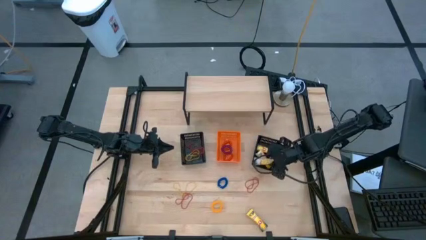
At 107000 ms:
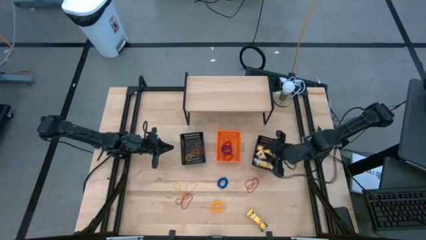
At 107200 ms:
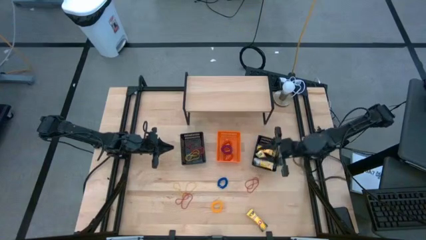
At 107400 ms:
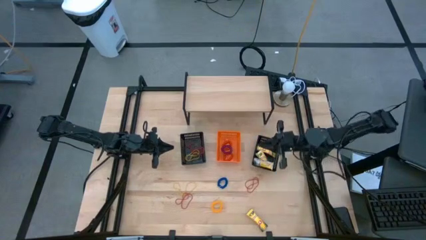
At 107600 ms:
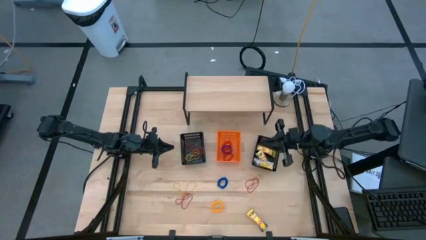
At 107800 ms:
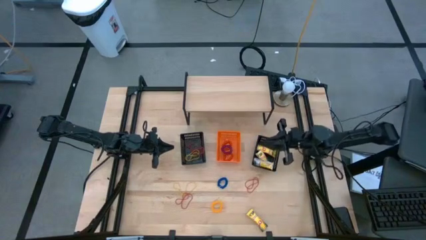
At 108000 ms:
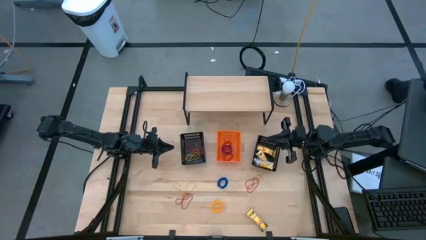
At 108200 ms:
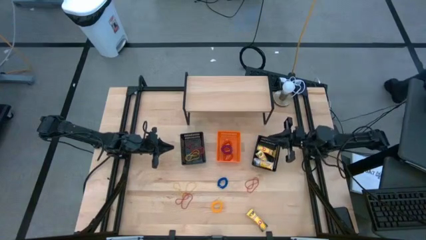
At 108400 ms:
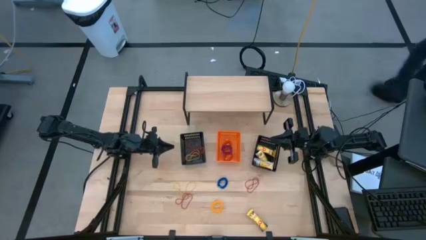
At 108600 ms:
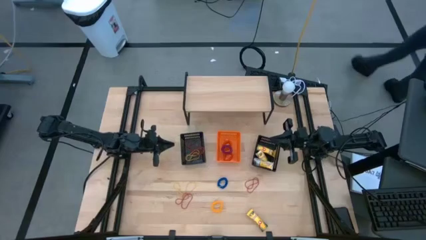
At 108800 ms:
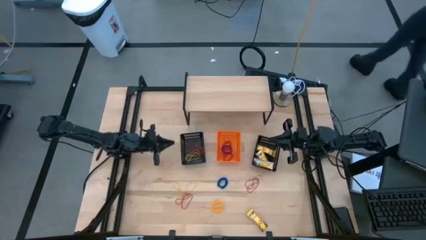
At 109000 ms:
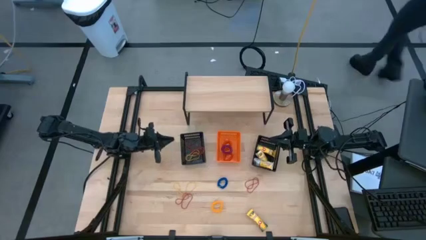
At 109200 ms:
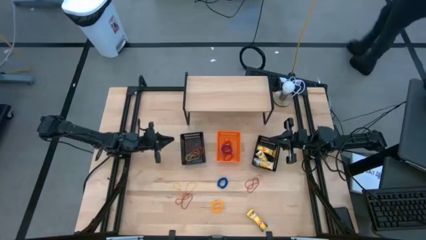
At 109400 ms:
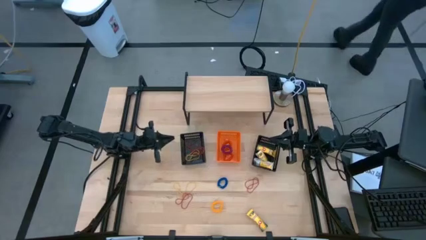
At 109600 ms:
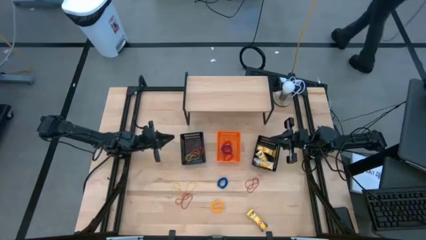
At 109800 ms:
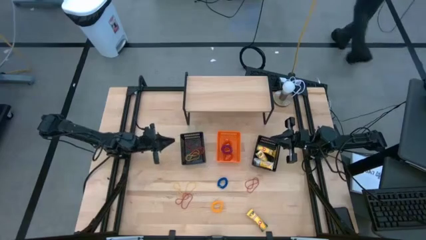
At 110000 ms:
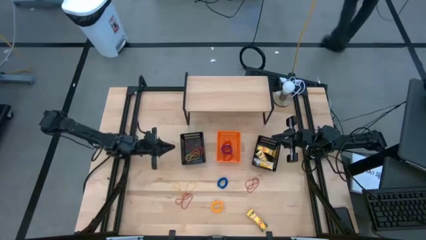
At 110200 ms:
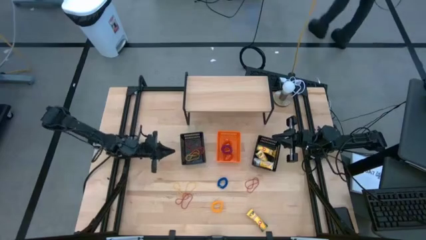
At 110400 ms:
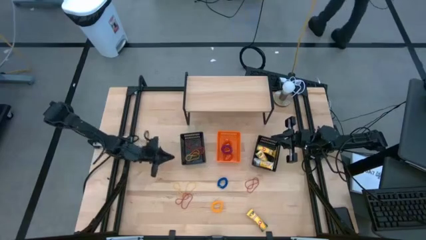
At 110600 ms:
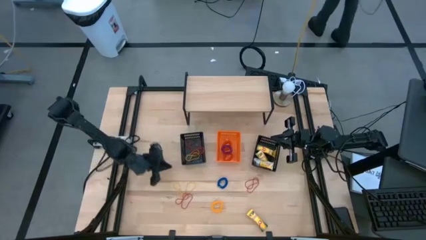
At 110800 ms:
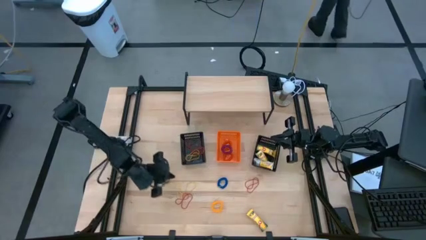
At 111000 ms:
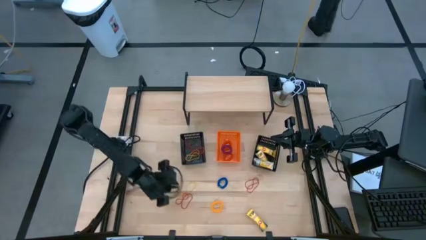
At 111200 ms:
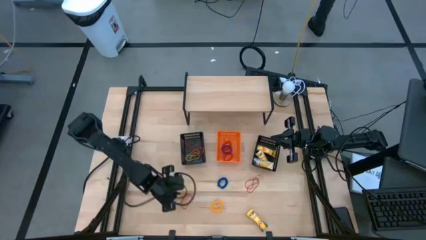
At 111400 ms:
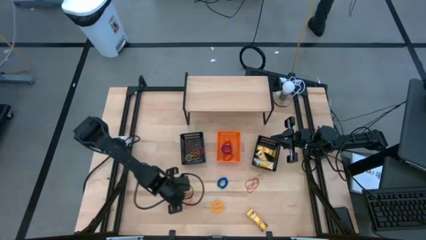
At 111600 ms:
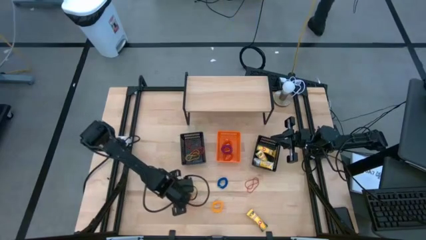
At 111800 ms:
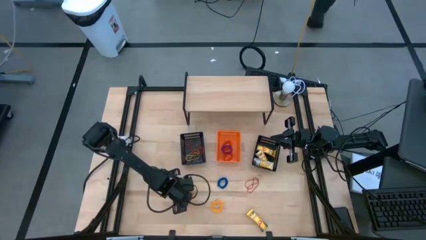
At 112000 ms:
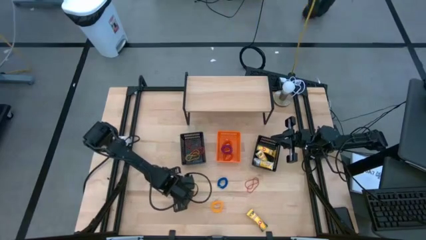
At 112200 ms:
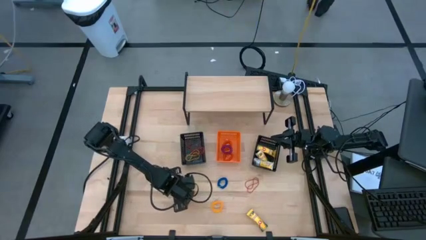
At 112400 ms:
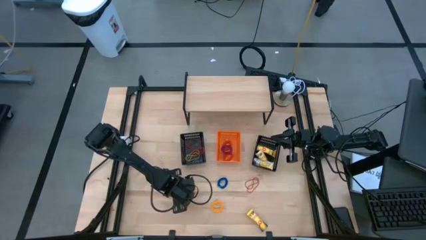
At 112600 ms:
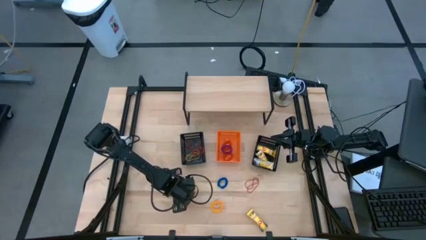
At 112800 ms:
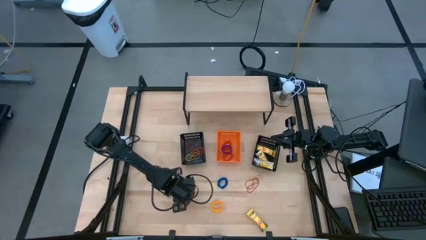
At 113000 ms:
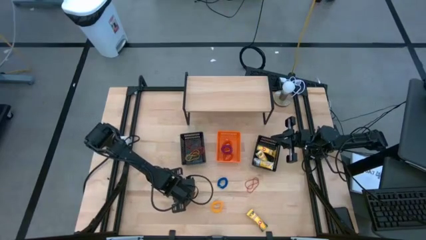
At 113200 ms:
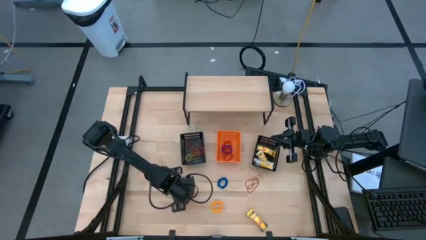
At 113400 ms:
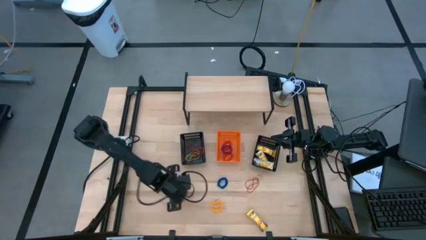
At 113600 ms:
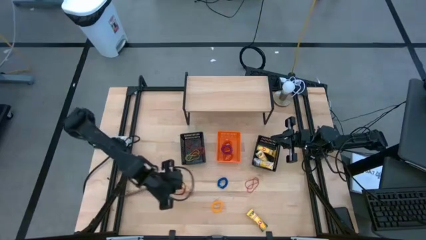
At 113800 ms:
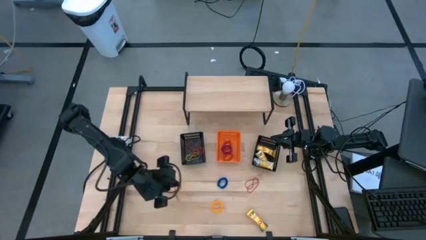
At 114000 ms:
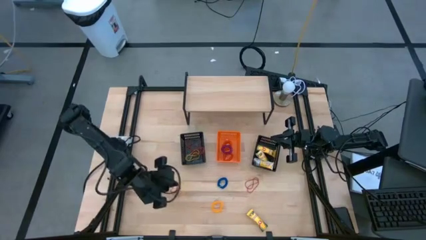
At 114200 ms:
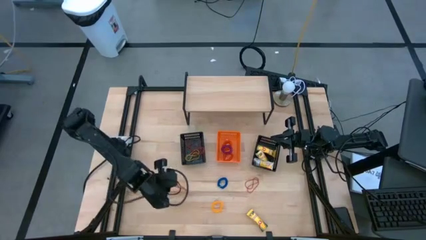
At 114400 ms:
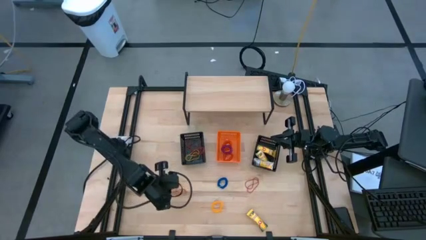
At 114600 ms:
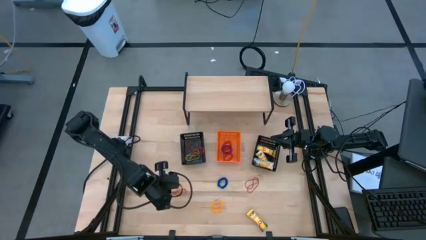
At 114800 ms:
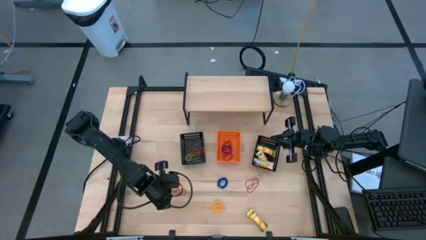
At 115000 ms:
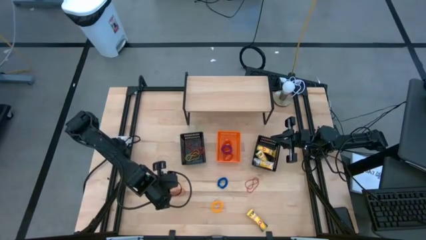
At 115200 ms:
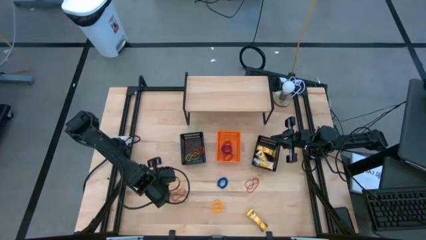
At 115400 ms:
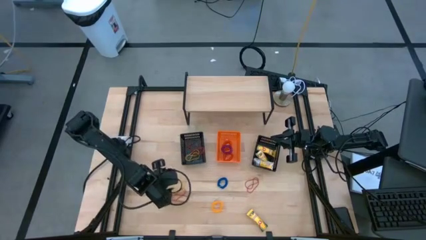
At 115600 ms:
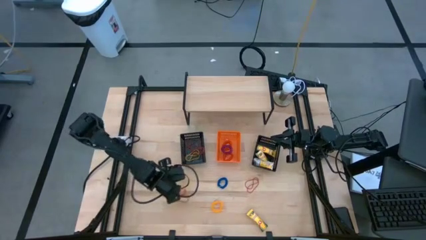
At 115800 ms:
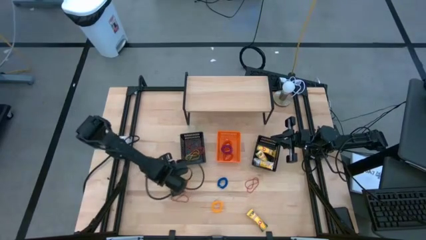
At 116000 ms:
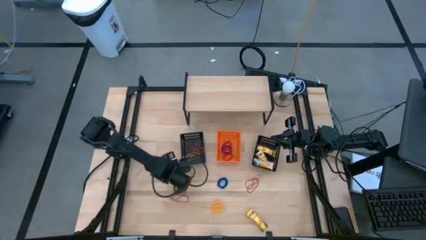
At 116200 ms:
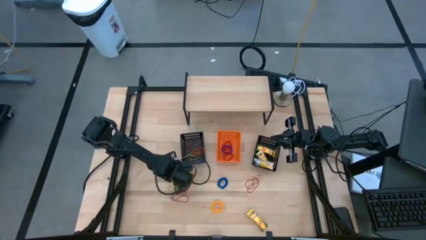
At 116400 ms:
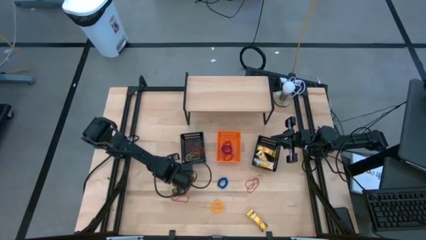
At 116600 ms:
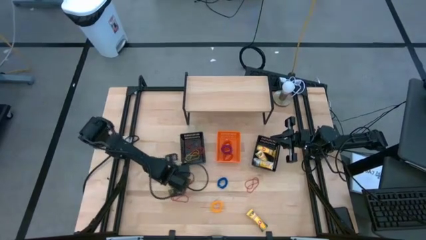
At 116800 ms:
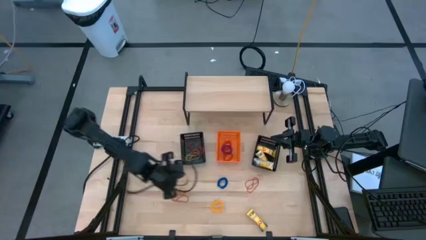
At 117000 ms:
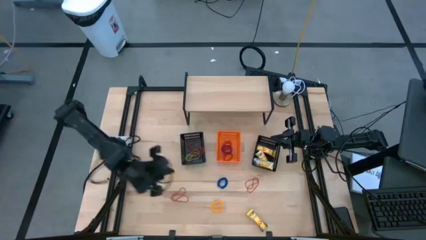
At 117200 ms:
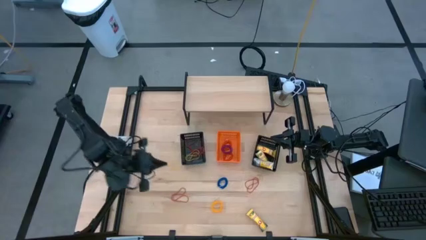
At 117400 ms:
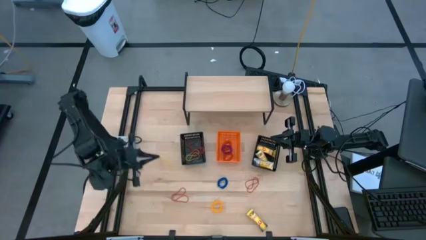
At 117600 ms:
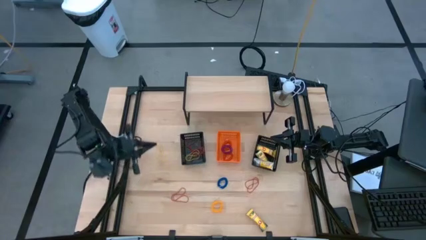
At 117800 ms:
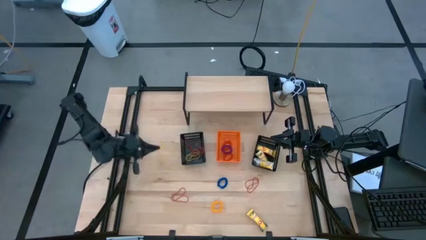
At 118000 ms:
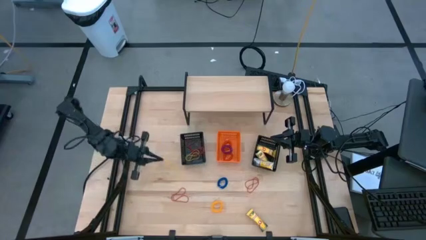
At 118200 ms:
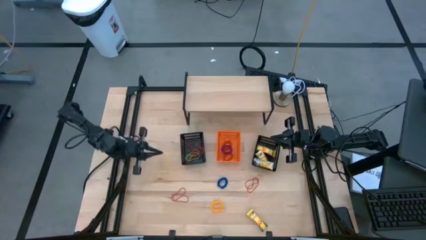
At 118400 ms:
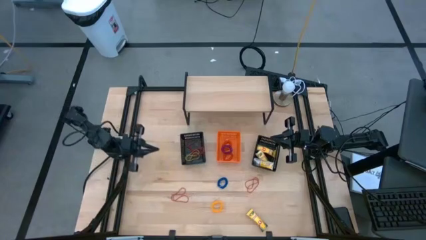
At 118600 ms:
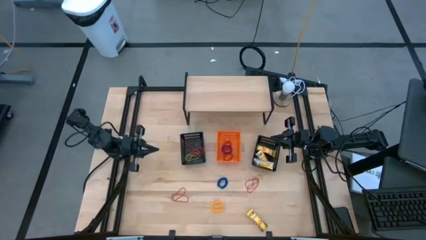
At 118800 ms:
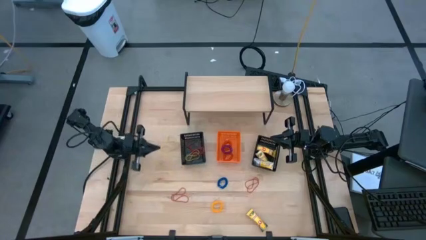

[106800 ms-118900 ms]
Task: Pick & Place Office Desk Supplies
Put the yellow rubber band into the left black bin

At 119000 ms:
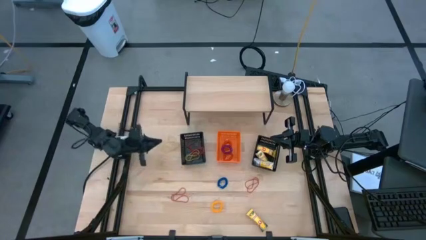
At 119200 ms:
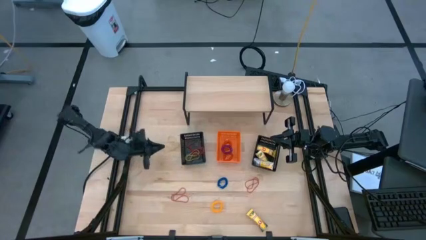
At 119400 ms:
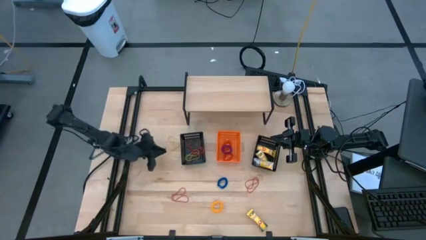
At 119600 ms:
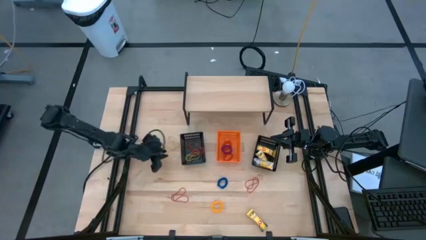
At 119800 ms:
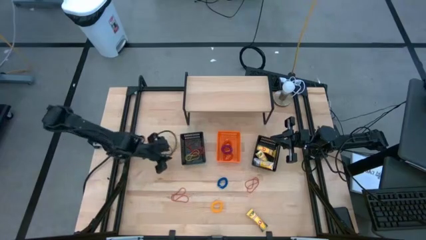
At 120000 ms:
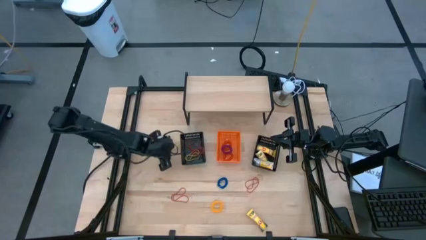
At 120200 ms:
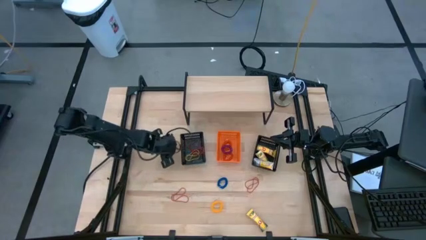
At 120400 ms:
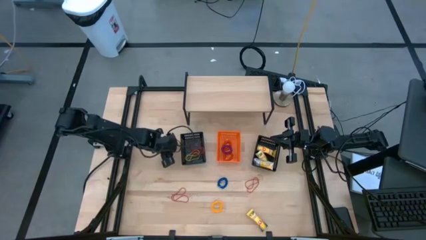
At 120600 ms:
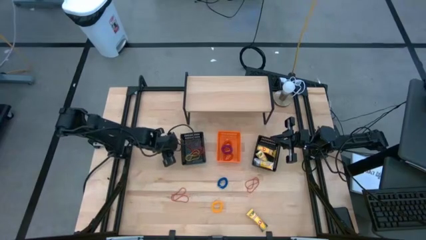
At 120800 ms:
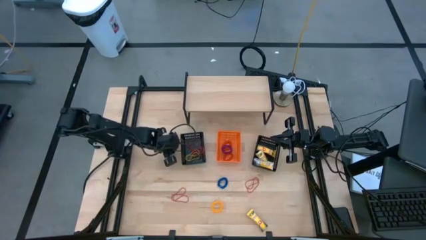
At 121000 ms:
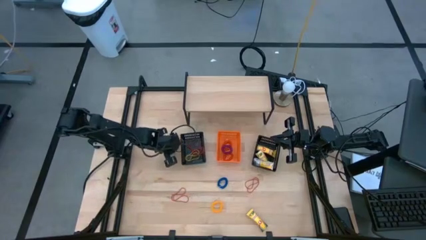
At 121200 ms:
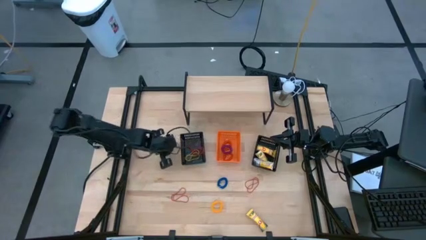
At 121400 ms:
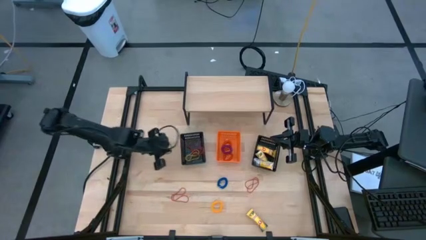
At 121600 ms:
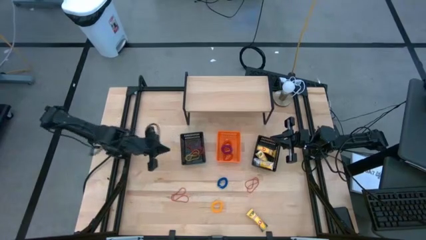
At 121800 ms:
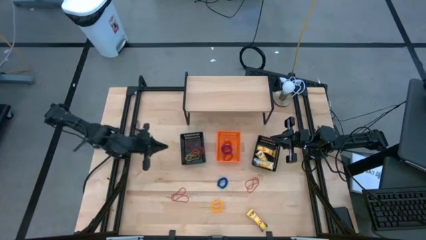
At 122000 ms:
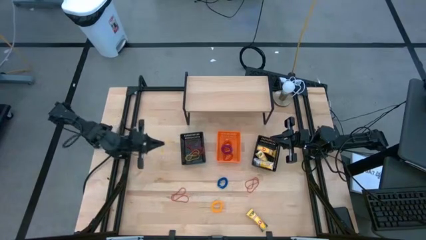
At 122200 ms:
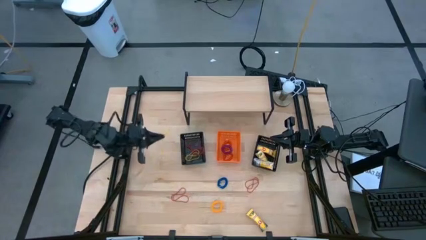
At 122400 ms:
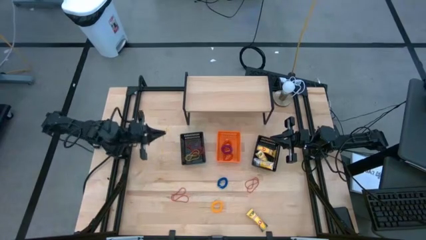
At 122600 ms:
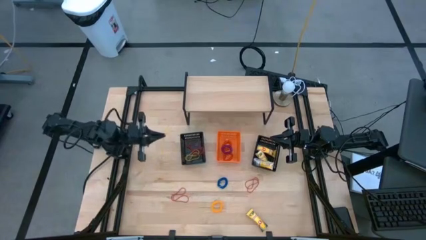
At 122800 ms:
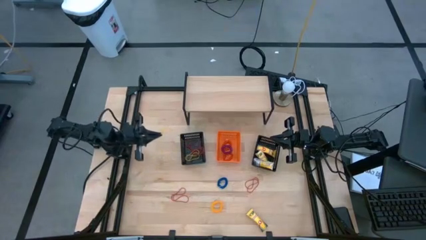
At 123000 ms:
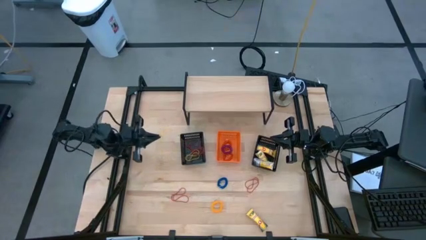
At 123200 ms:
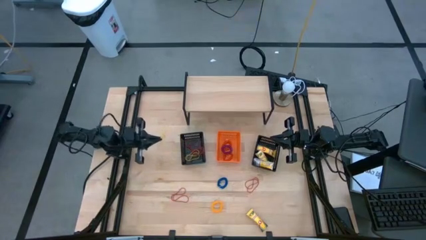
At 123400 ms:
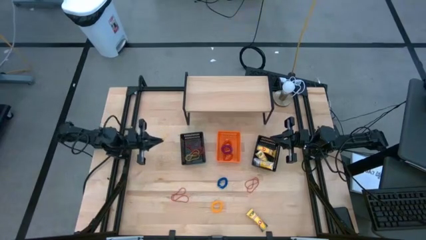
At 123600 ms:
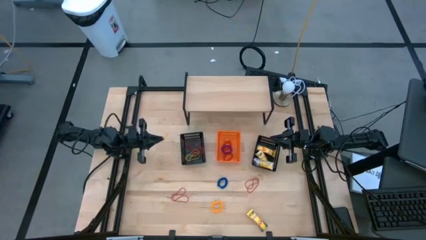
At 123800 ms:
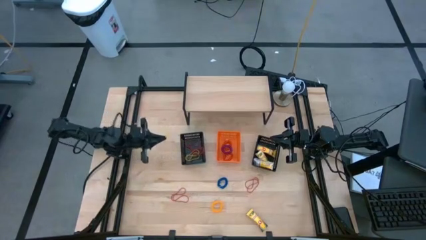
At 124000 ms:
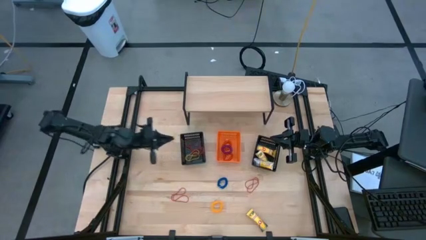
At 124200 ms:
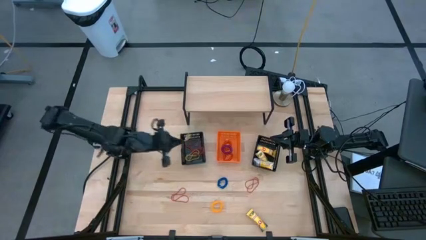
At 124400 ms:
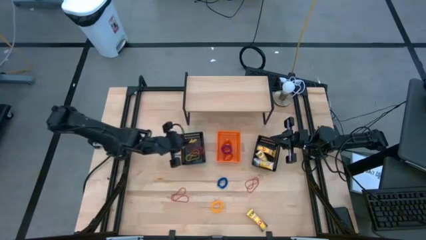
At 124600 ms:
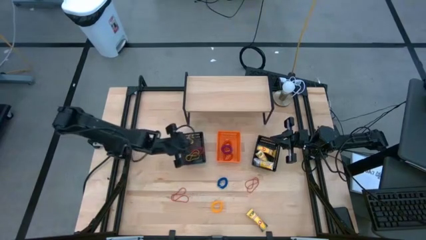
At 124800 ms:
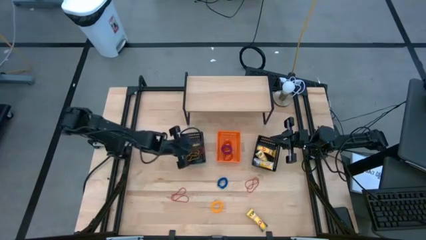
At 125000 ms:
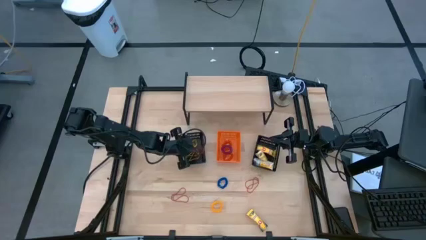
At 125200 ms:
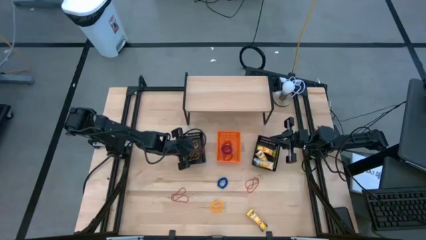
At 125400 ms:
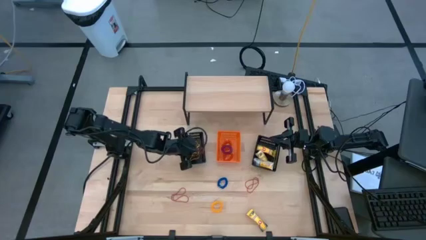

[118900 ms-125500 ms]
Put the yellow rubber band into the left black bin
